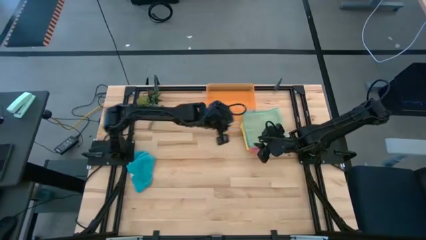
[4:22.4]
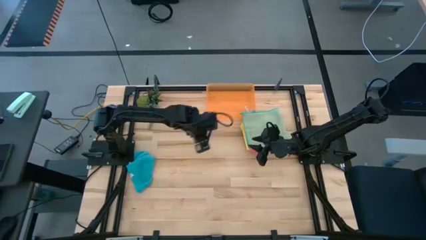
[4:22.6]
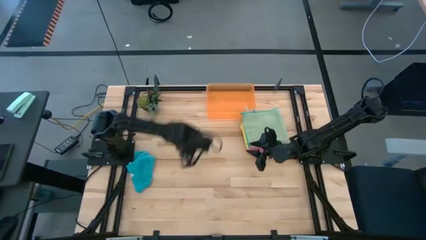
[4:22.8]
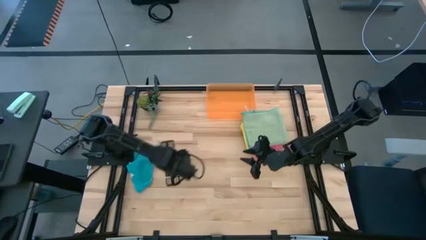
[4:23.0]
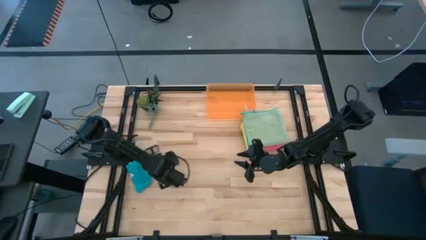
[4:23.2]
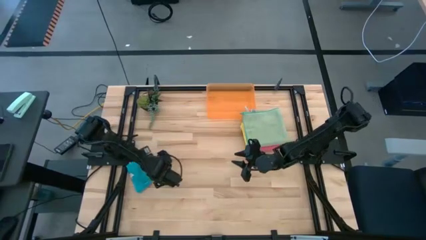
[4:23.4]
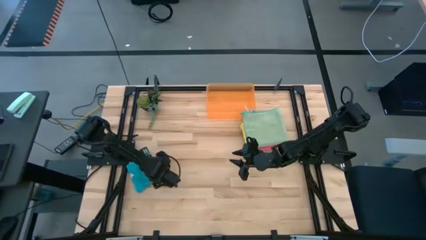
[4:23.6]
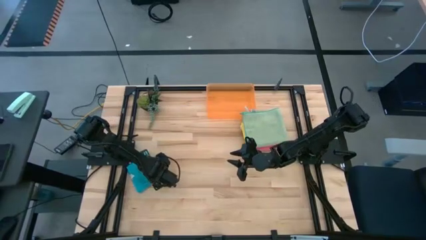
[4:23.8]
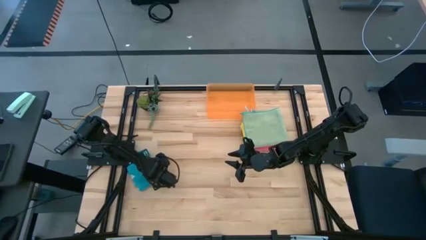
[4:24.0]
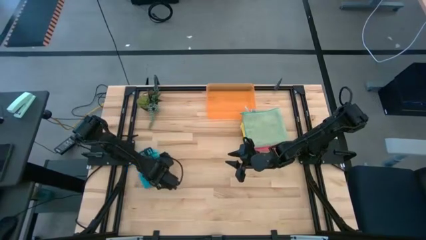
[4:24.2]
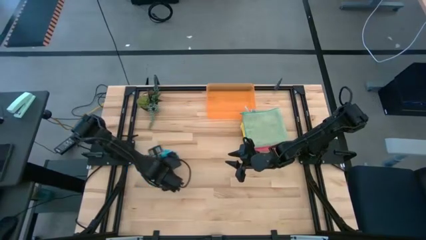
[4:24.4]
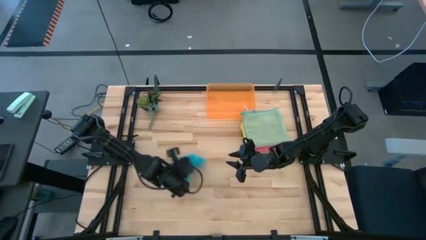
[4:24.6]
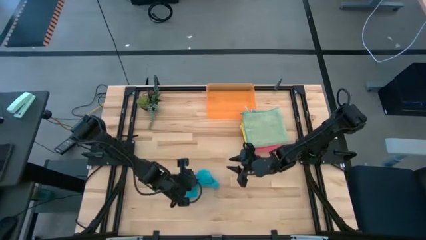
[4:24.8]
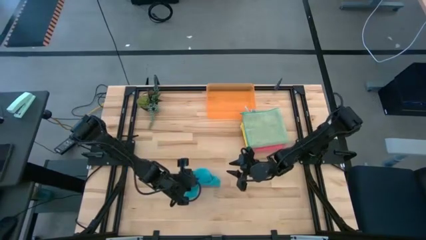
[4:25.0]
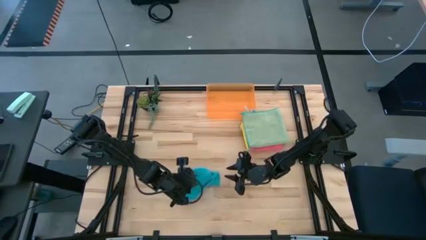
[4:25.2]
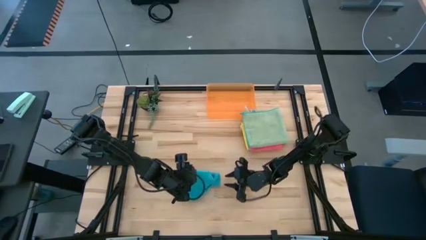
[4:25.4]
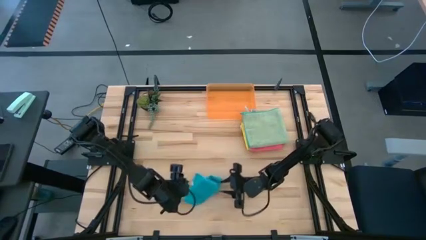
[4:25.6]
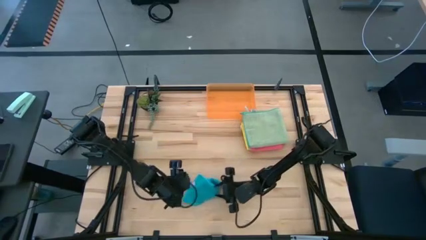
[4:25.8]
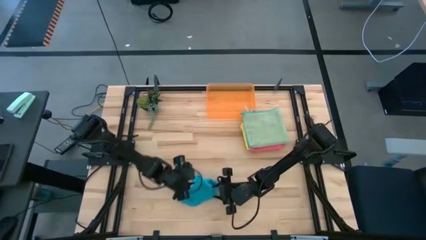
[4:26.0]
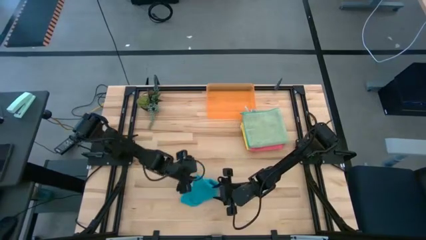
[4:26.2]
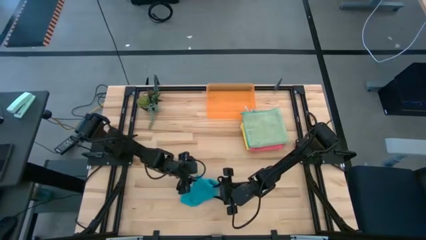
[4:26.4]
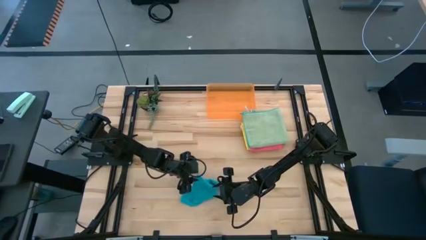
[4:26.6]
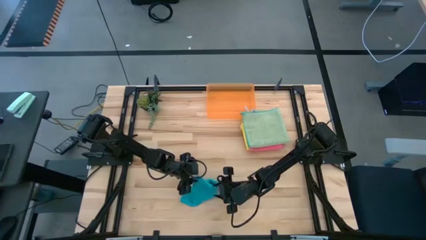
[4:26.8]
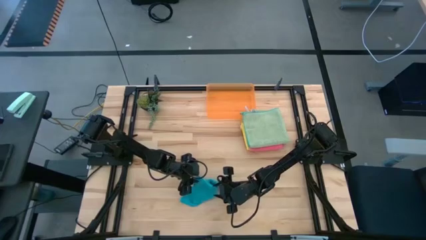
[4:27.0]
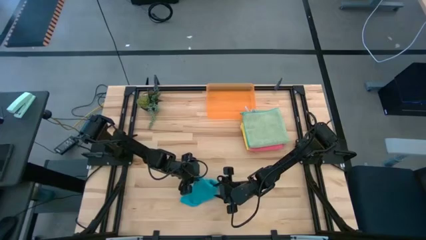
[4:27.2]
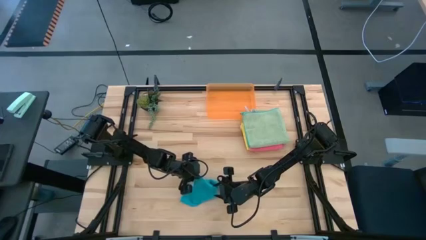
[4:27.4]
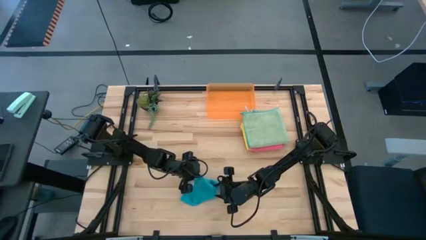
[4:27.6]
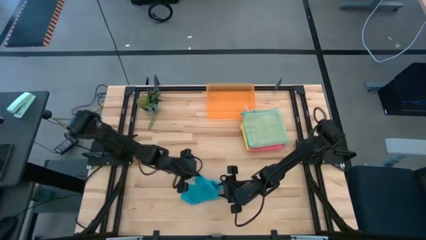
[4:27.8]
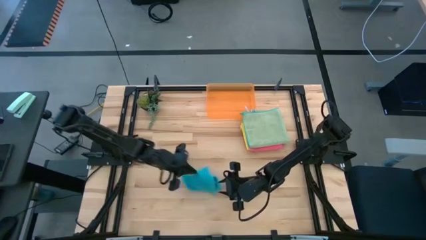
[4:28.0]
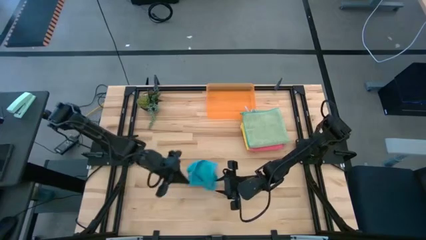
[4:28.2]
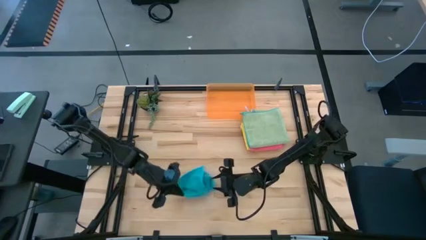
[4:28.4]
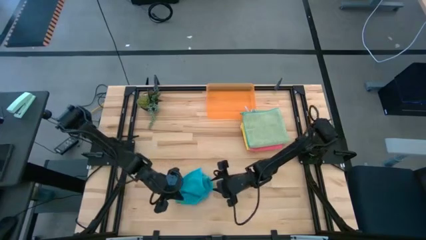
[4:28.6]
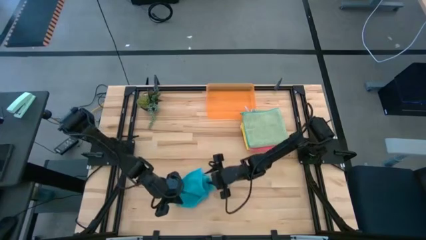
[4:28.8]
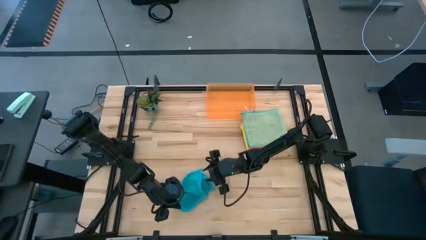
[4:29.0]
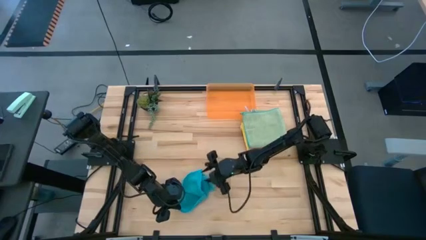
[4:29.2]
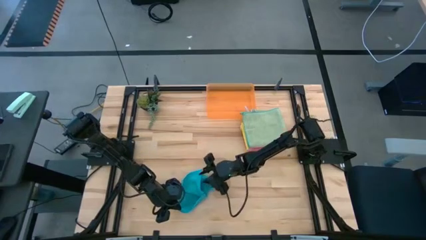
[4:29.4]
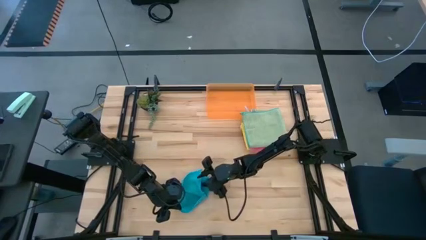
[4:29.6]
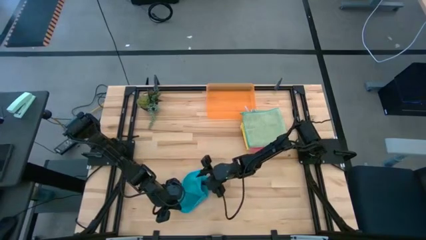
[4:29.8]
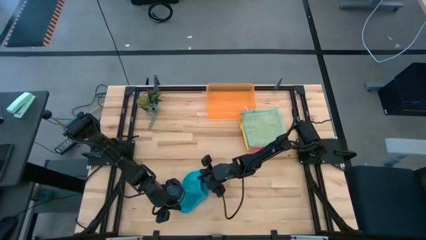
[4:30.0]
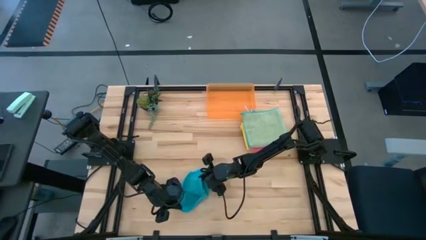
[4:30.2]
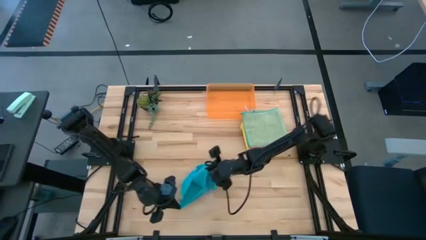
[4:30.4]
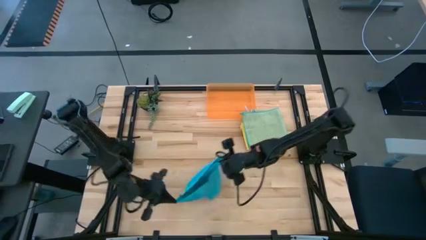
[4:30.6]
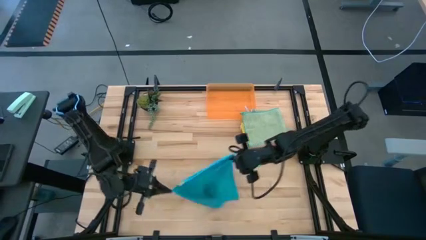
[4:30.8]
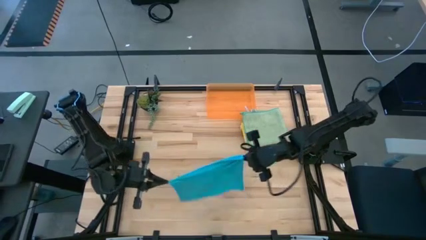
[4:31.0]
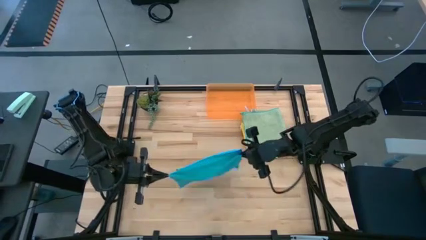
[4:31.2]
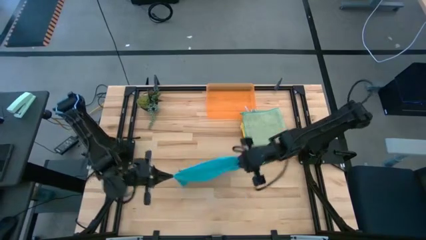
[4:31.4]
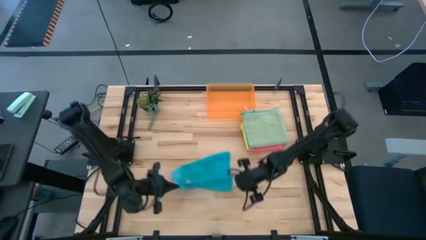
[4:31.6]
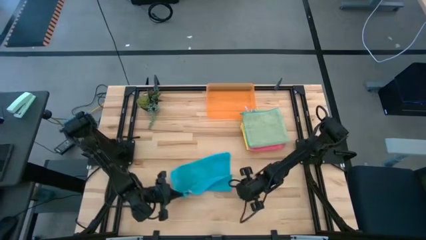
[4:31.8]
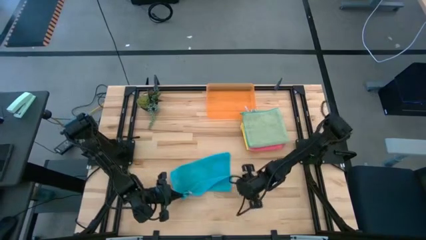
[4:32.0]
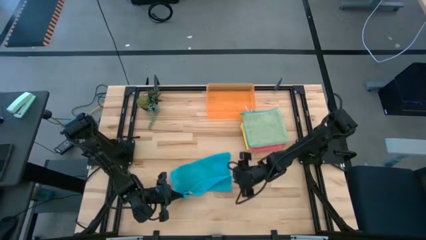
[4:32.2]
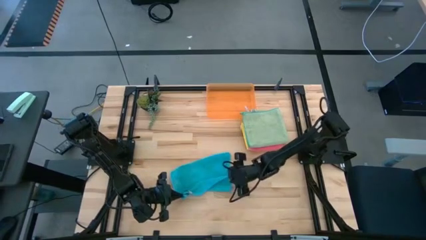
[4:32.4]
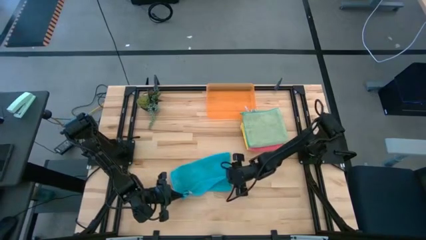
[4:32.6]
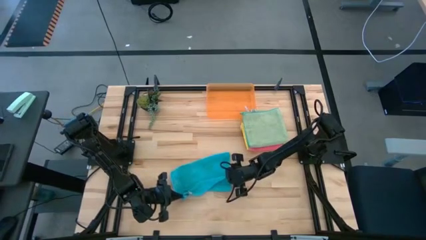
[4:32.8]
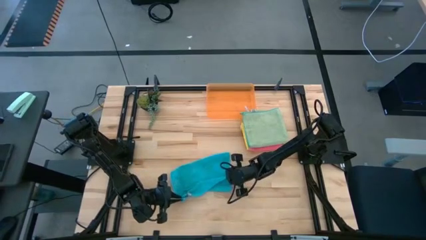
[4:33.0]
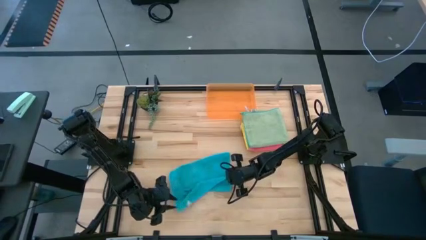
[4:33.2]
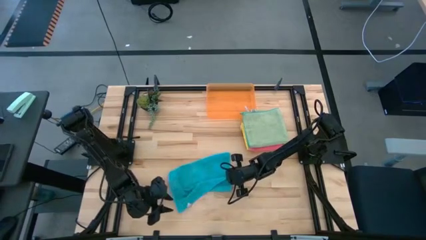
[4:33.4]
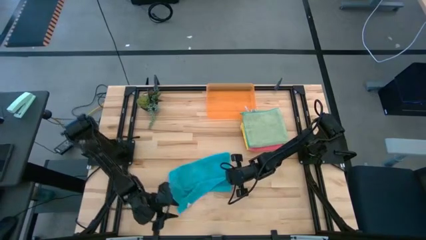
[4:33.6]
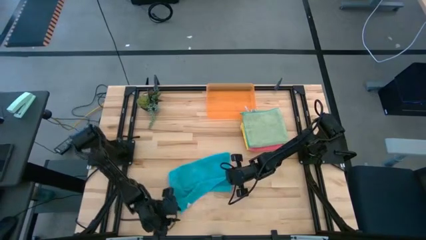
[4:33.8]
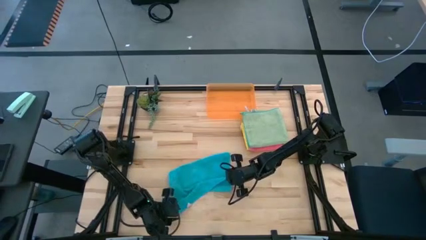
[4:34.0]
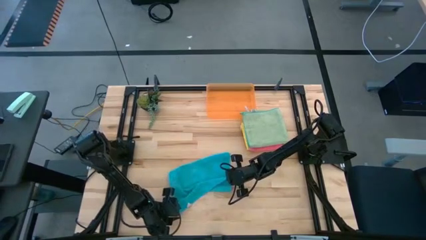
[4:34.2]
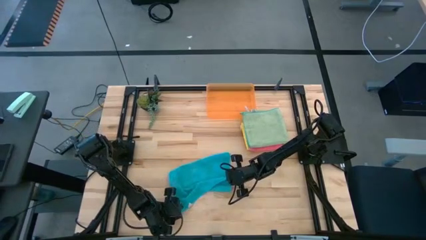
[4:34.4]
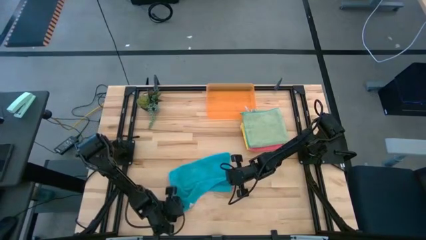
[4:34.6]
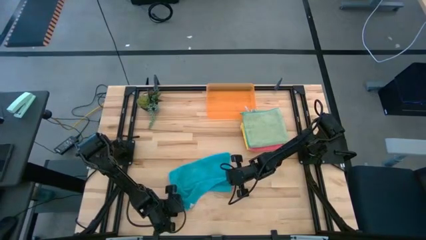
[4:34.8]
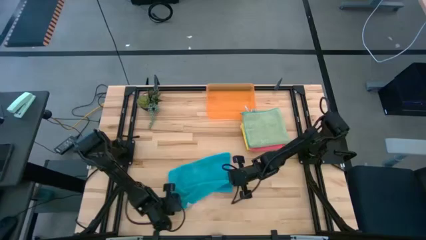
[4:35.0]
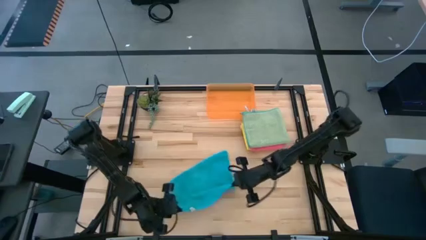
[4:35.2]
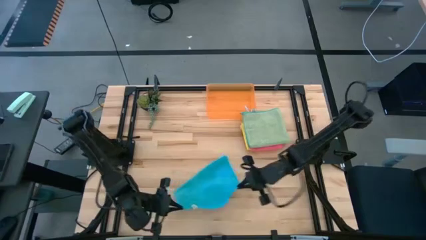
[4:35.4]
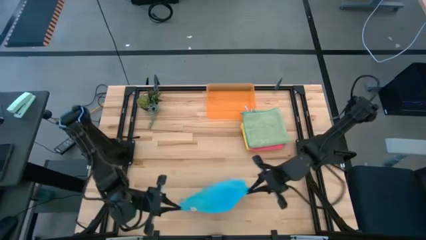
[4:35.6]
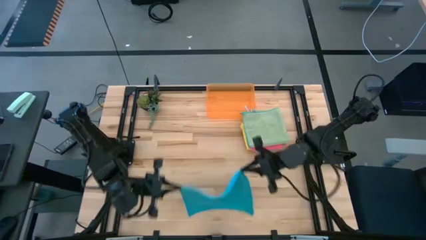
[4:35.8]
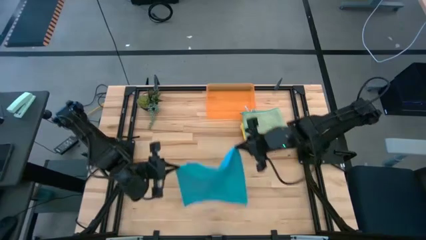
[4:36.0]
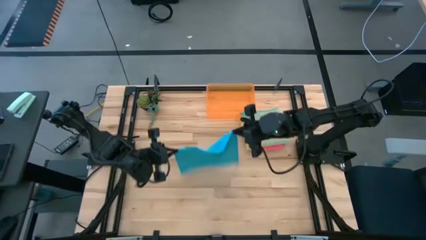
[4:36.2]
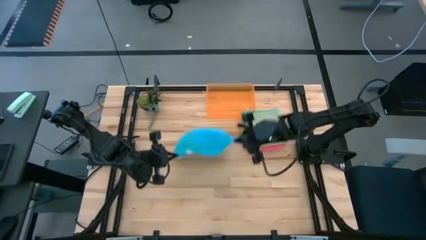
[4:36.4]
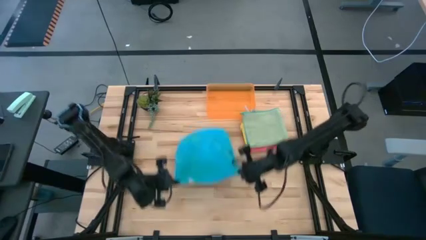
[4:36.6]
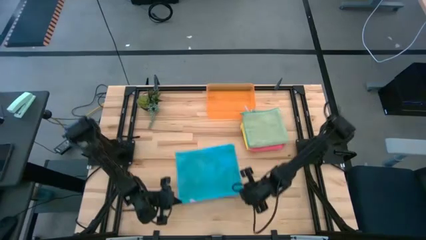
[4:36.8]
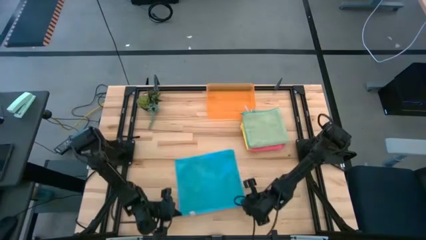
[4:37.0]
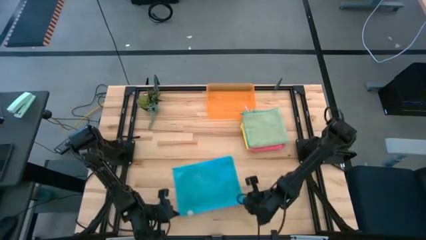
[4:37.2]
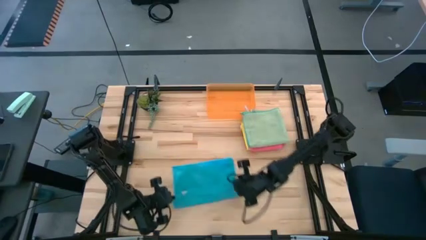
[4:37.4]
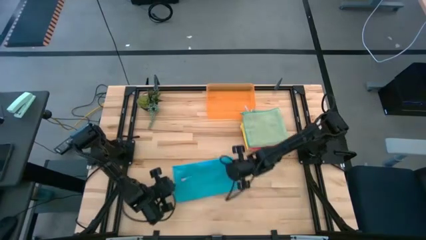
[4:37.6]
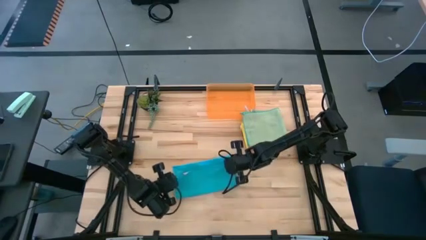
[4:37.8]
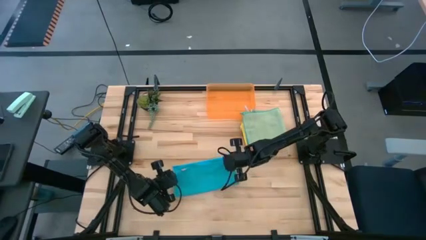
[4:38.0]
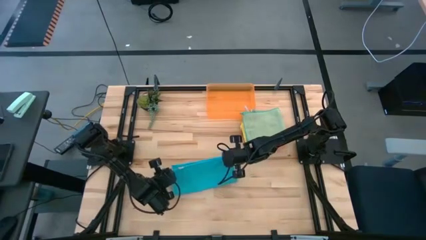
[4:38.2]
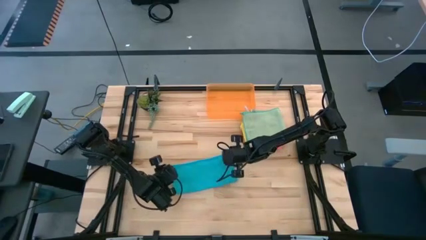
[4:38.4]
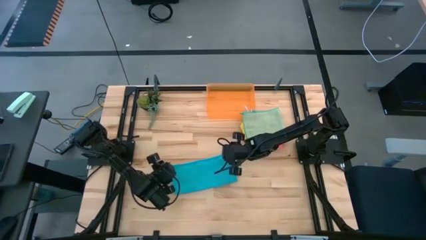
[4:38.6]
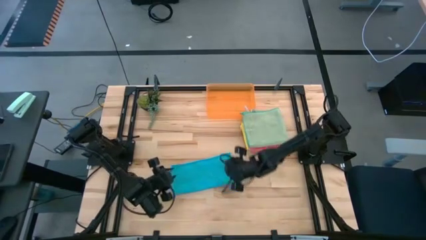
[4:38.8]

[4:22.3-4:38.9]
Task: Fold microfiber towels
Fold the blue microfiber cloth

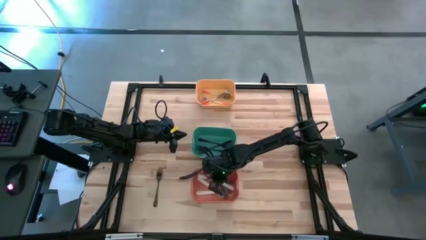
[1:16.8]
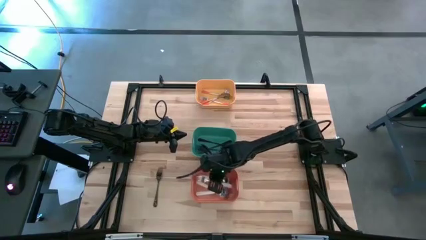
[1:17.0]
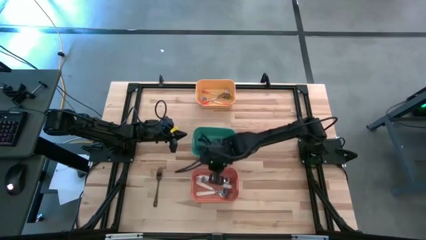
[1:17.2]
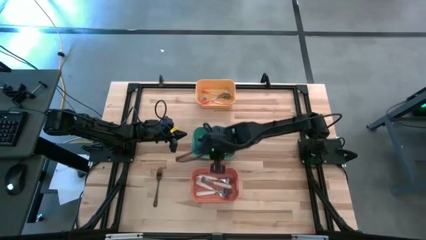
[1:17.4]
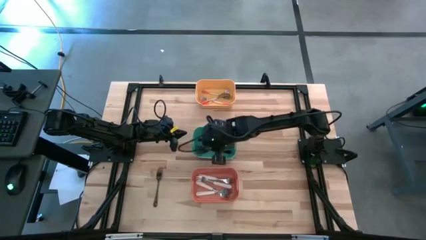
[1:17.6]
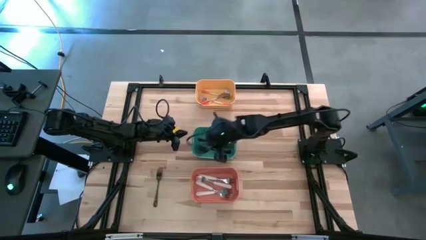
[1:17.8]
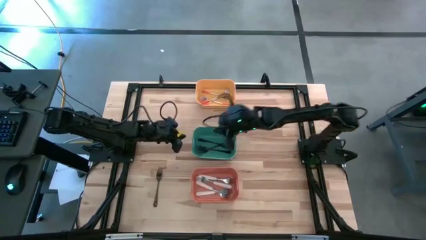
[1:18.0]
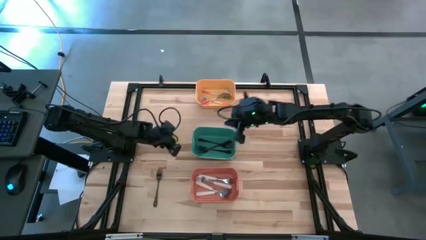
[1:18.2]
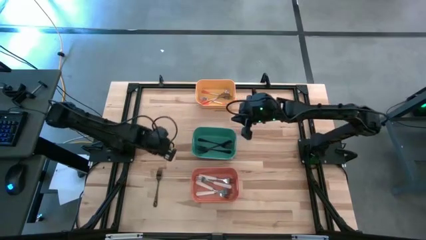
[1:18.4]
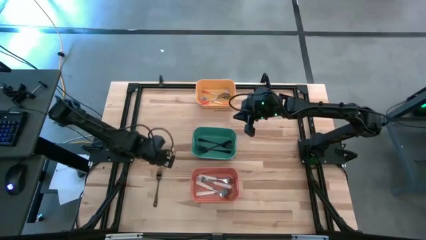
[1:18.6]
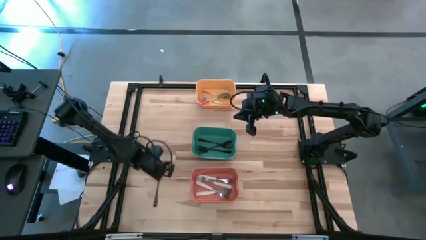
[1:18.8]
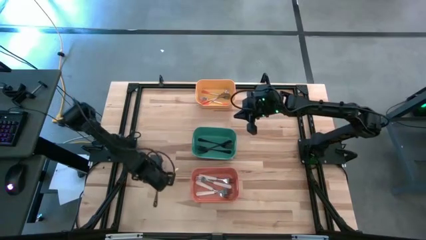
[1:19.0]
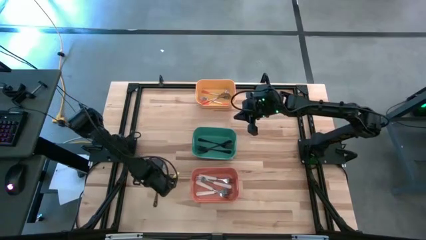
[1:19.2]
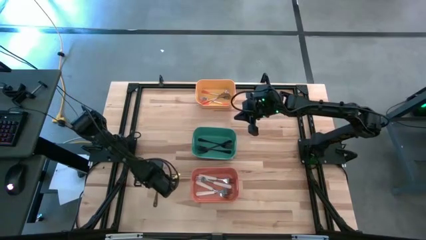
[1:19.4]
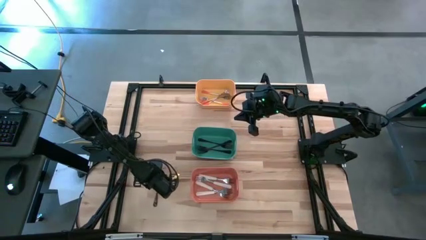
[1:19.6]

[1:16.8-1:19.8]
Task: Sort silverware by color (type)
Put the black fork into the green bin
